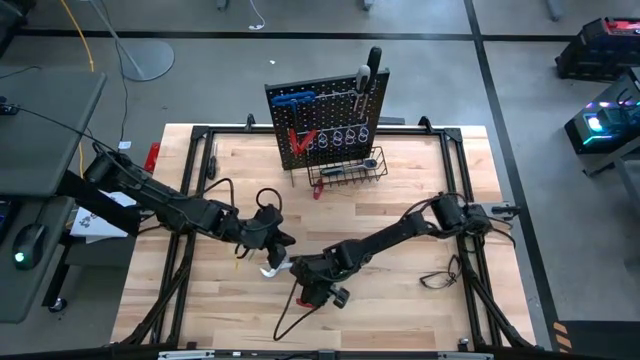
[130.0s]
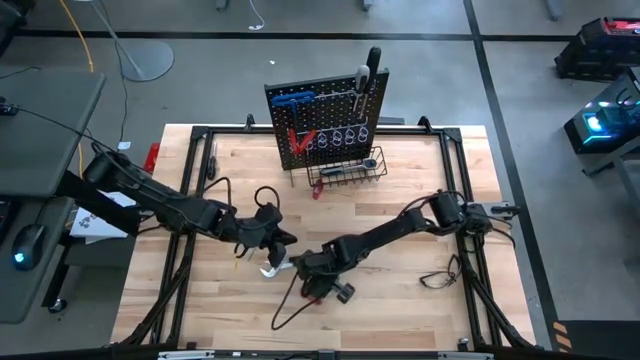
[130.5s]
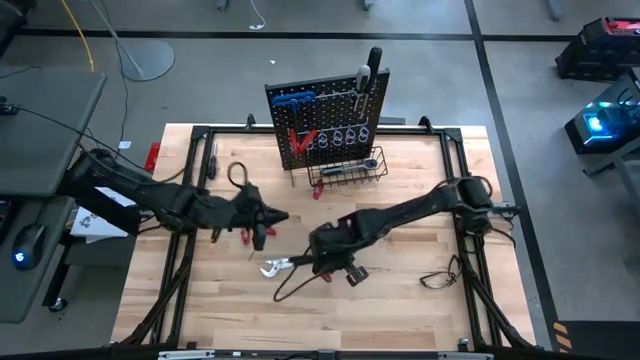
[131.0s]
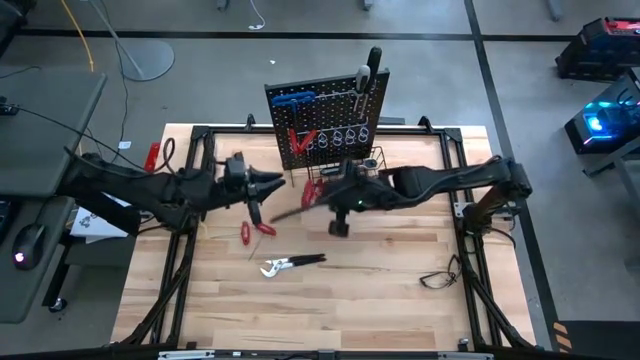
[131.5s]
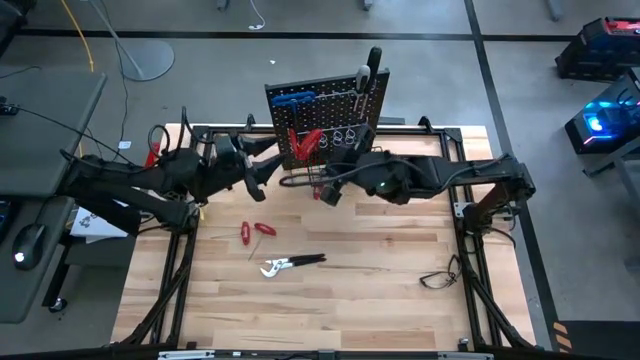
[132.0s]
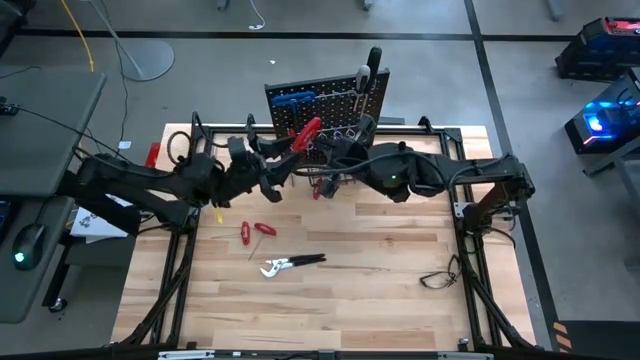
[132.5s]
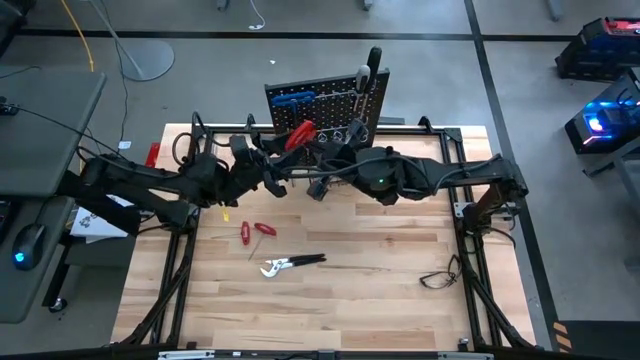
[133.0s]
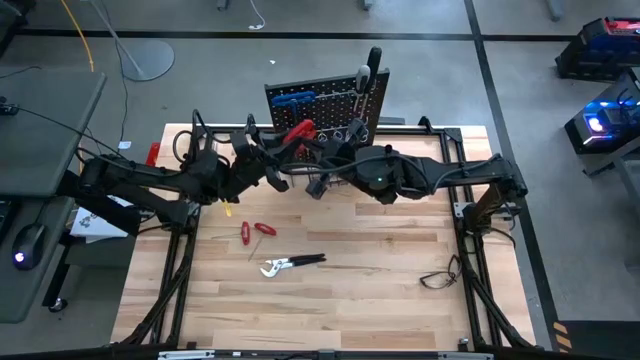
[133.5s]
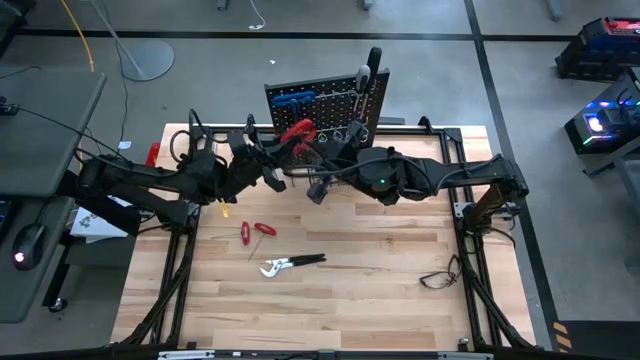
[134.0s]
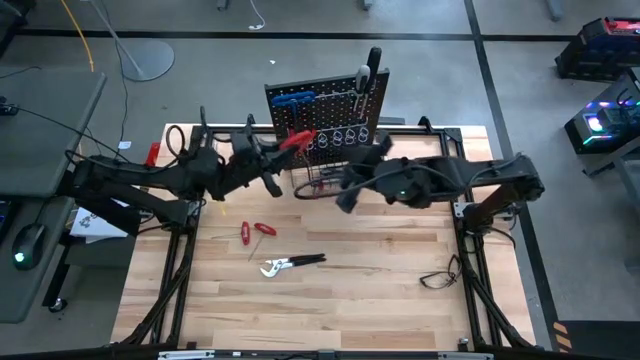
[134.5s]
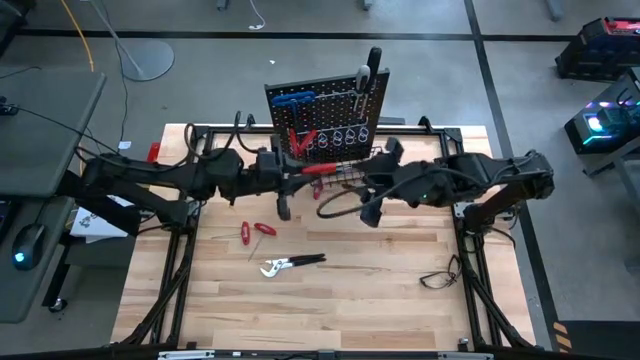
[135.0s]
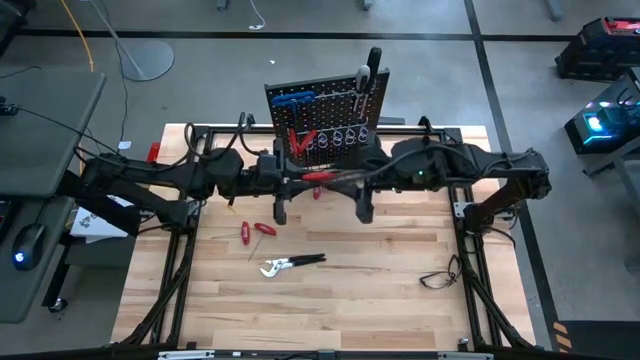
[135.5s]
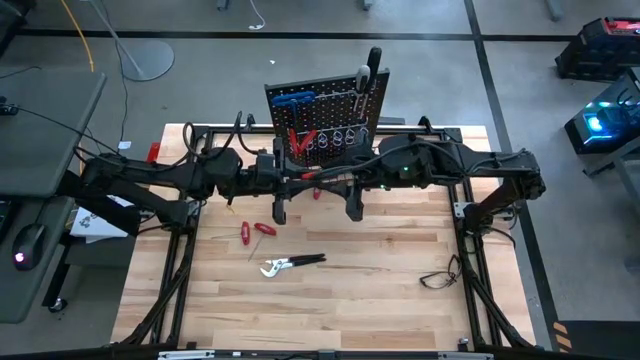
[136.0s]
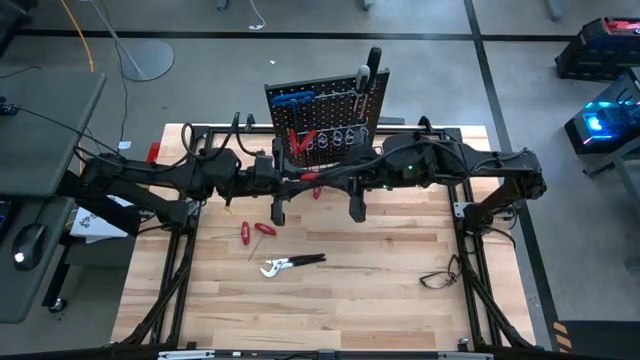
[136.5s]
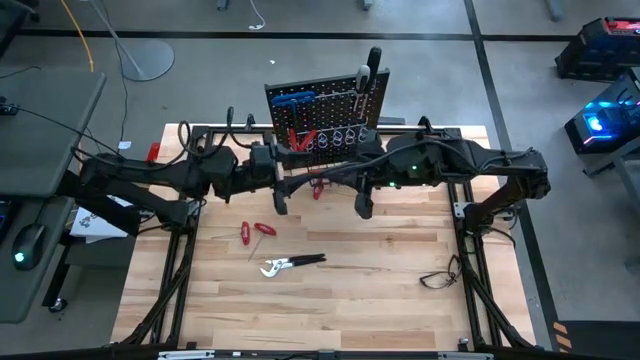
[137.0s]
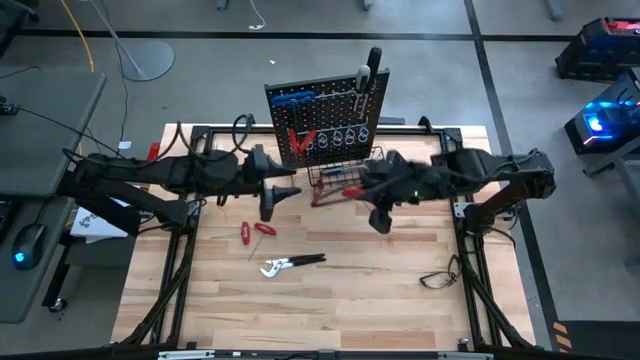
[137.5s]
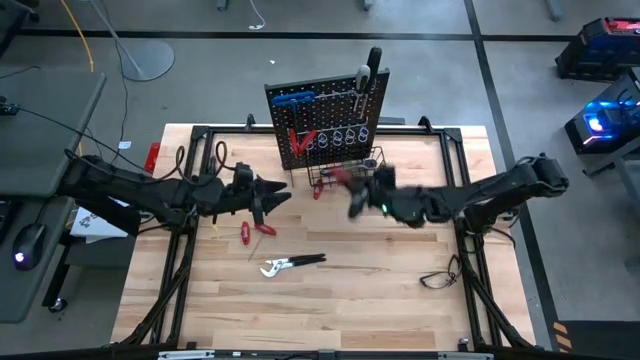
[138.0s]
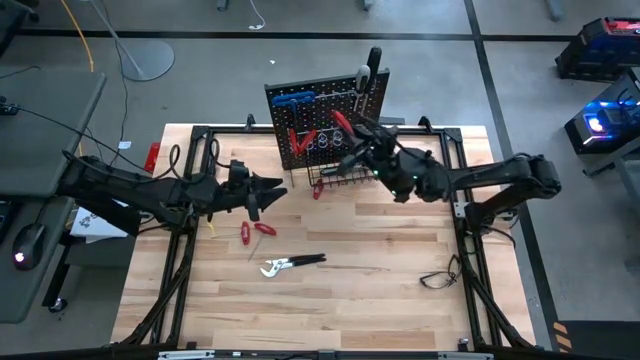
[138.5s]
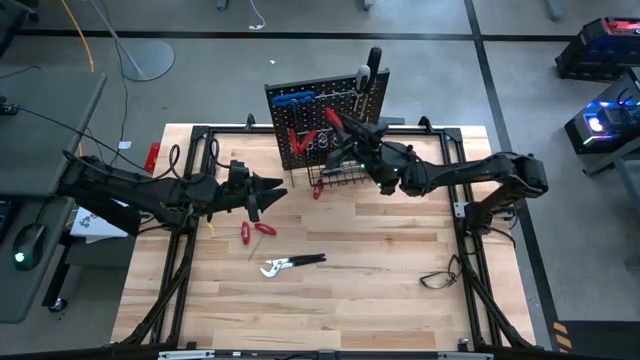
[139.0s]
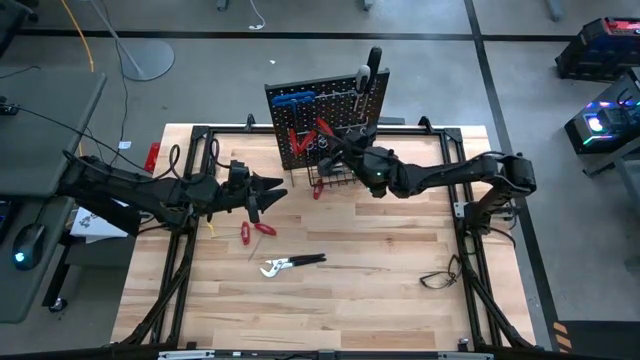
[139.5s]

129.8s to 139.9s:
Task: Hang tools onto peg board
Hang the red allen wrench on the peg board

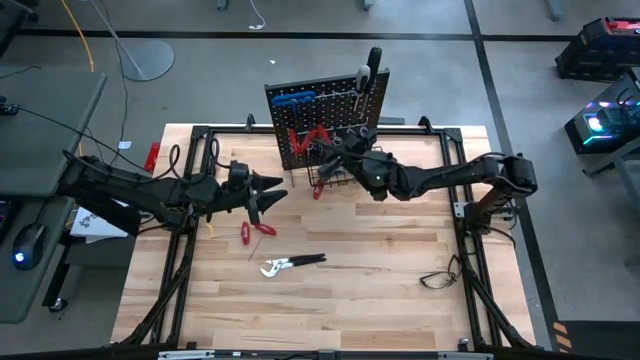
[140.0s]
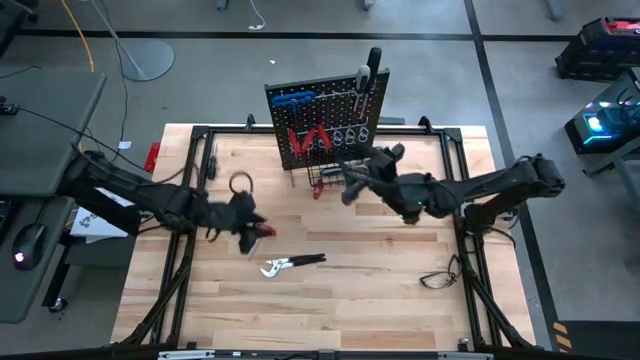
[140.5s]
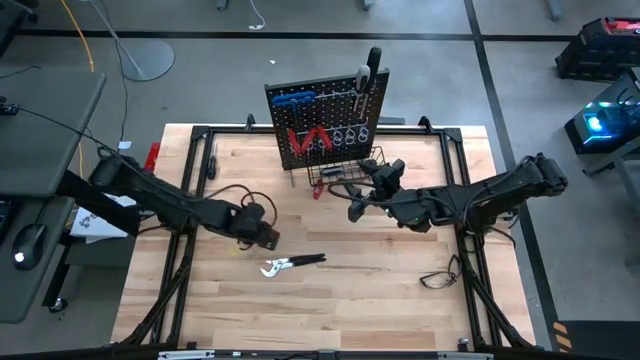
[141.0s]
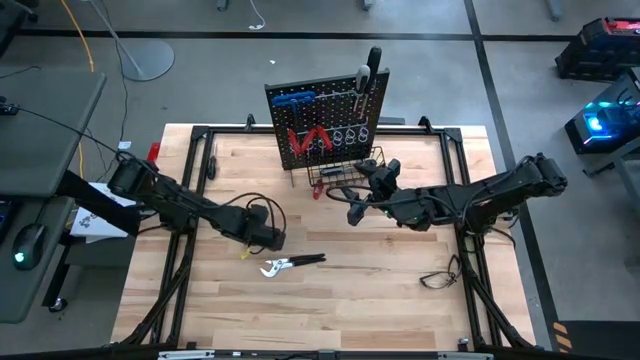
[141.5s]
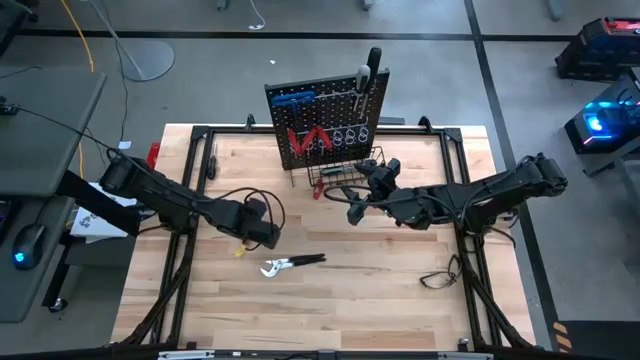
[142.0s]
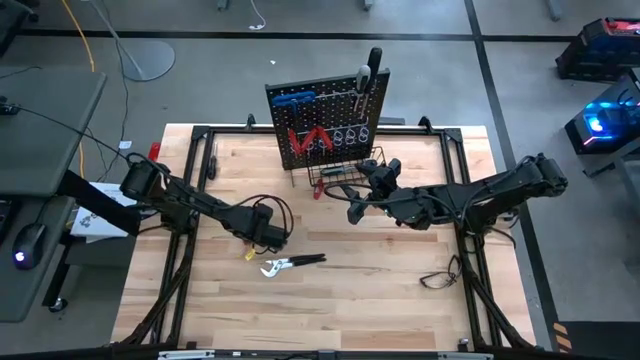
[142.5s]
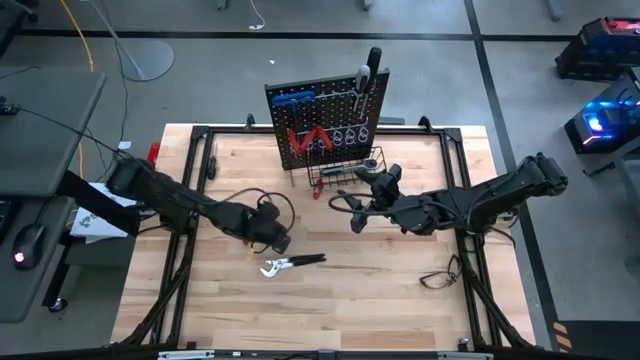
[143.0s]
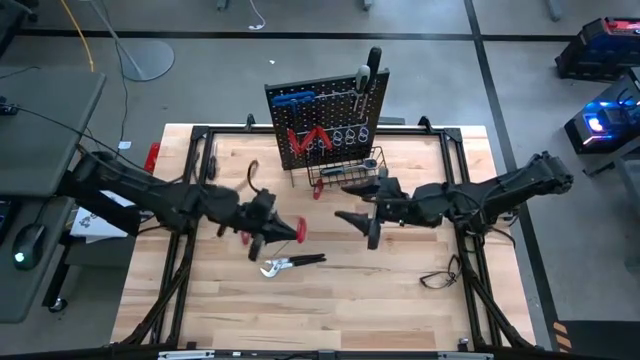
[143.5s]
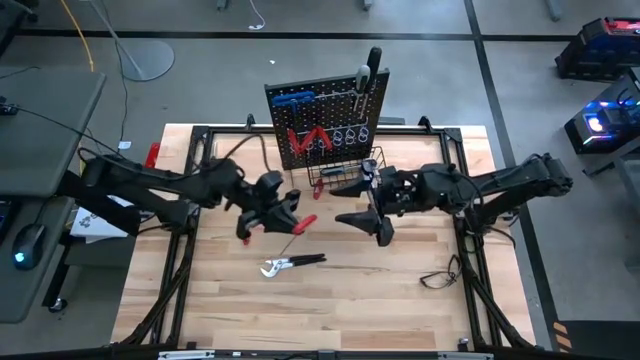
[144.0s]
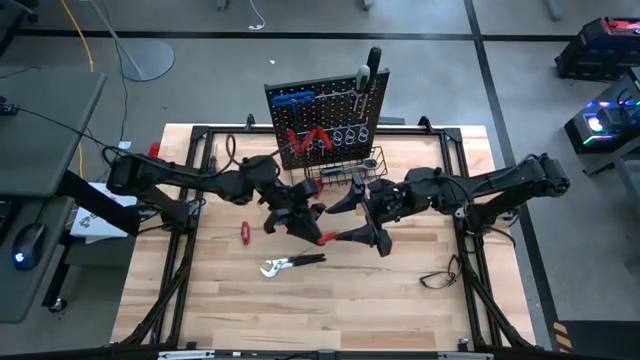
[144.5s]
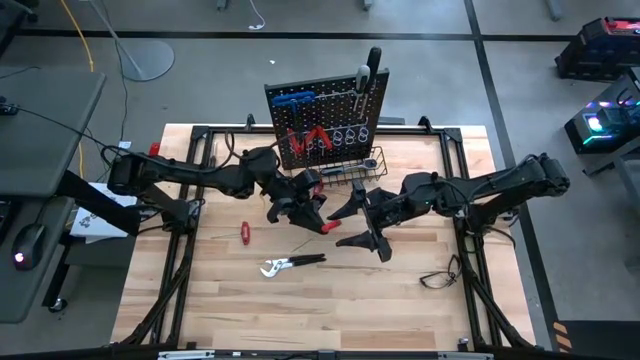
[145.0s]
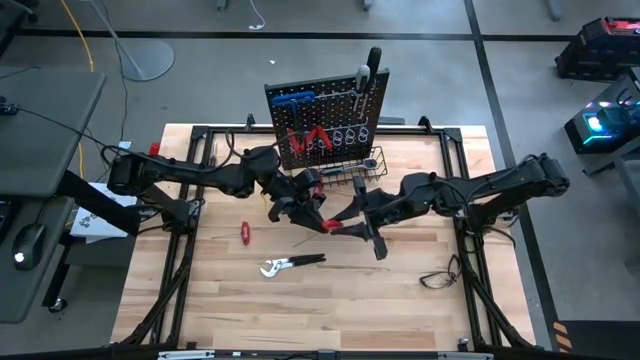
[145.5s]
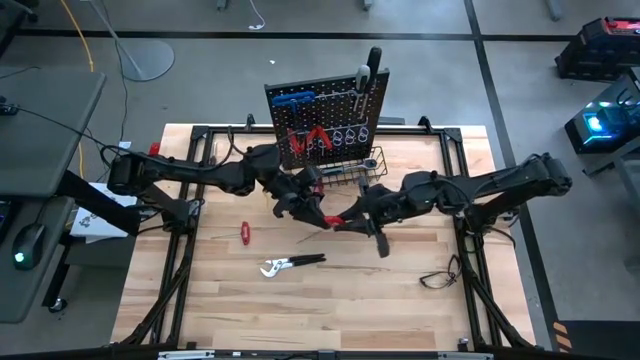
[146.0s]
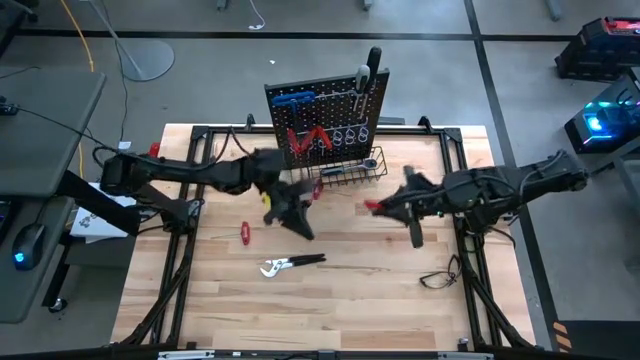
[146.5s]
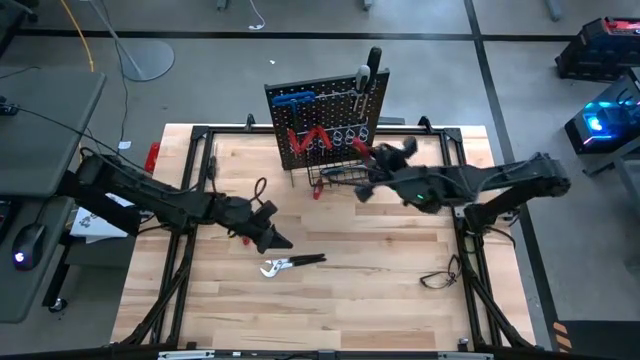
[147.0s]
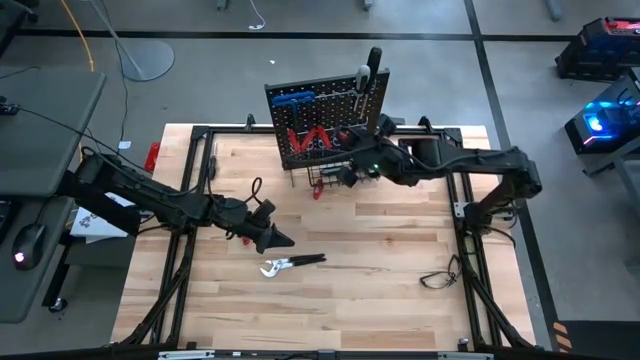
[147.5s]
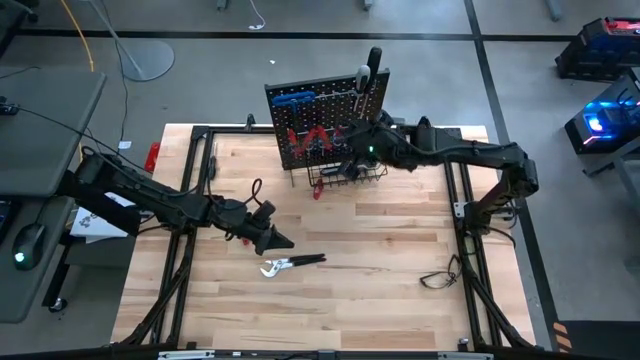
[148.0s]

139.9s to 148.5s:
Hang the red allen wrench on the peg board

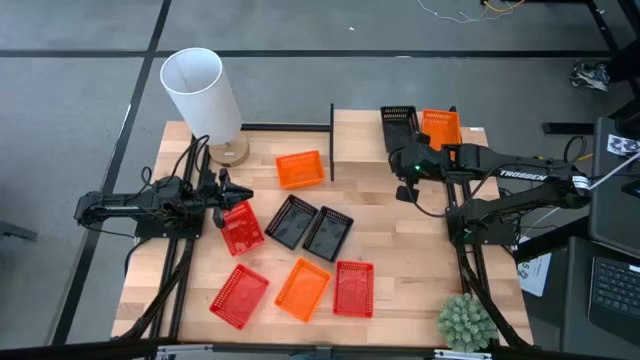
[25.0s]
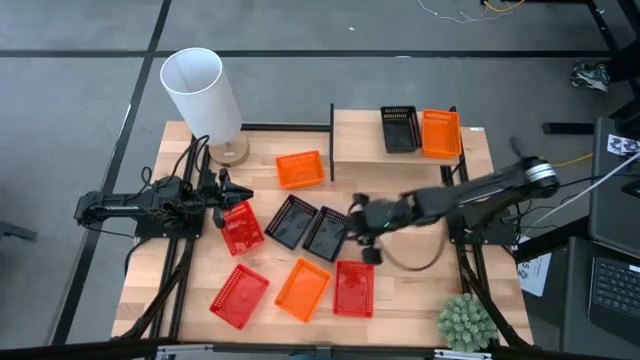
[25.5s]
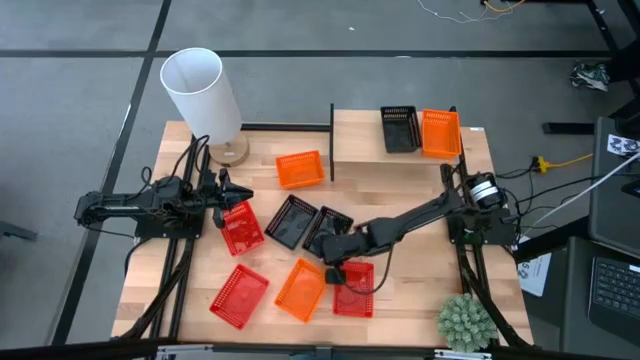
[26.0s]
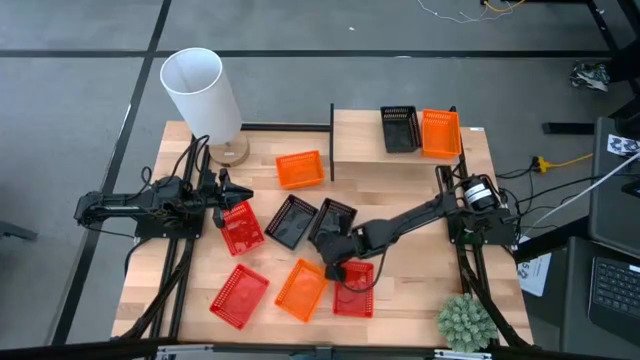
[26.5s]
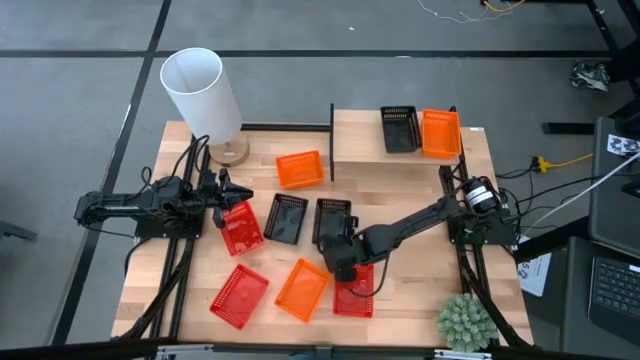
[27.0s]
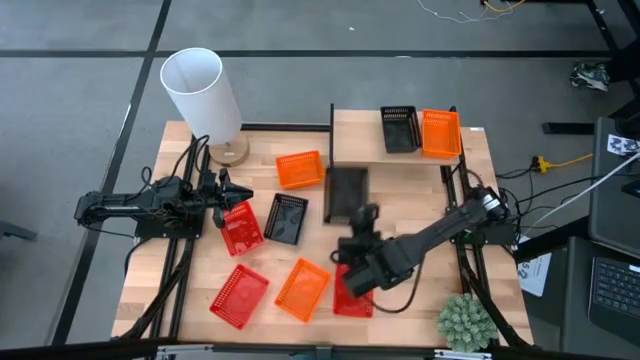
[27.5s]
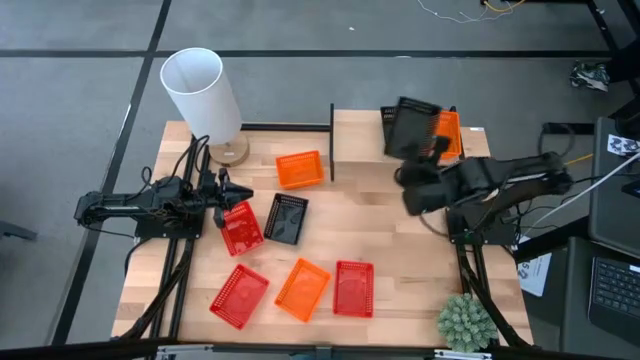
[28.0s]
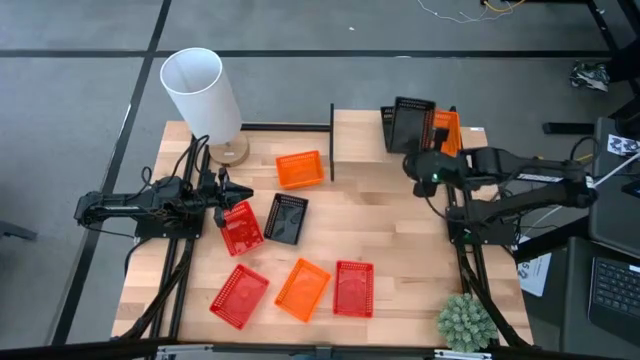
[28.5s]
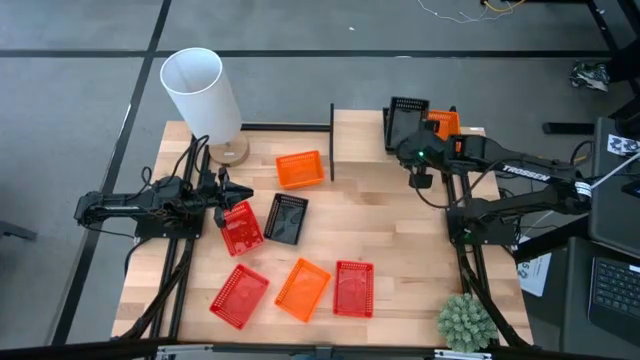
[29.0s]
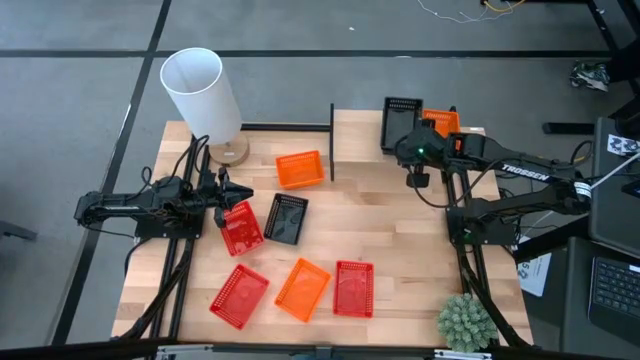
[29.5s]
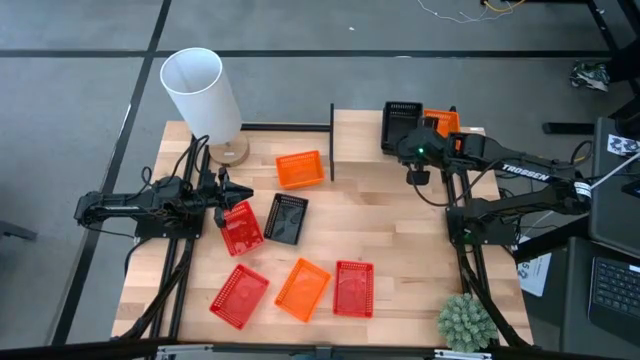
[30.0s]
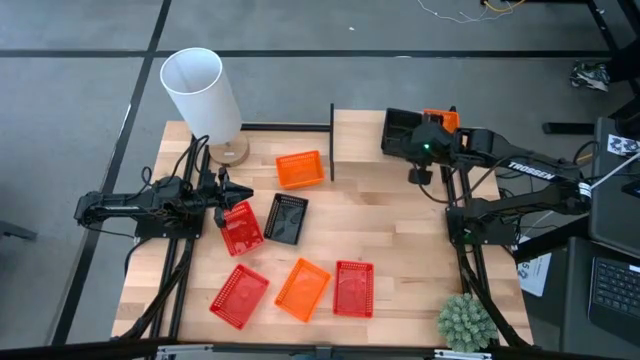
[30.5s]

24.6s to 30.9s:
Task: Stack baskets on shelf by color
Stack the right black basket on top of the black basket on the shelf
